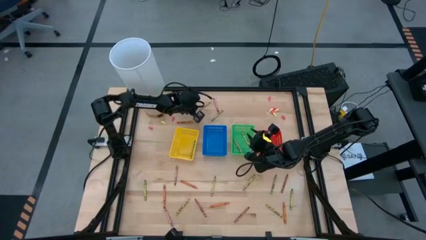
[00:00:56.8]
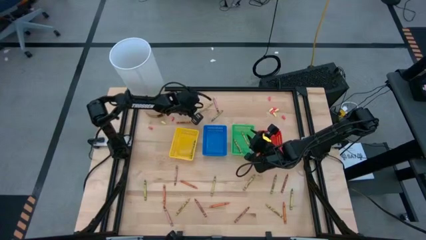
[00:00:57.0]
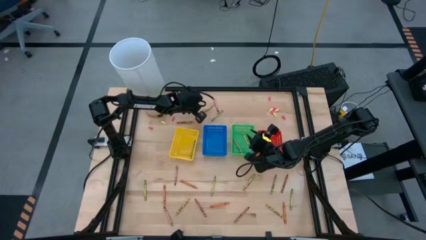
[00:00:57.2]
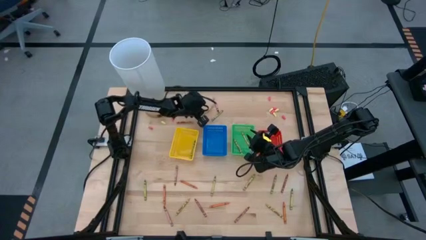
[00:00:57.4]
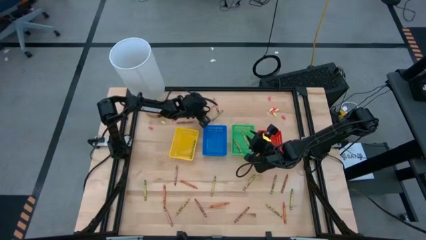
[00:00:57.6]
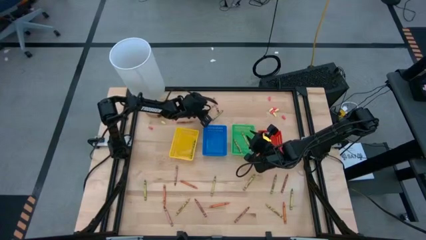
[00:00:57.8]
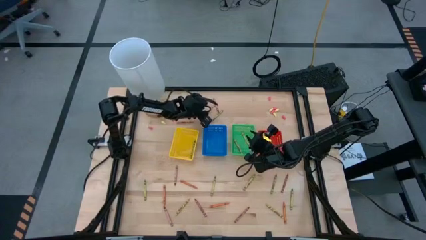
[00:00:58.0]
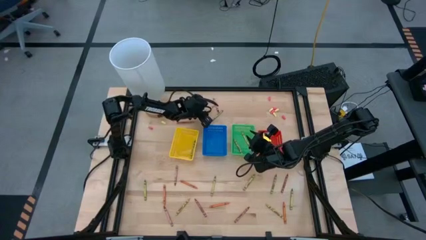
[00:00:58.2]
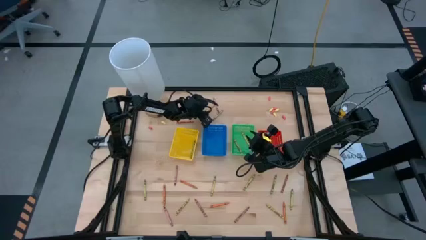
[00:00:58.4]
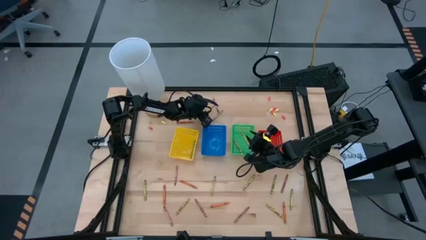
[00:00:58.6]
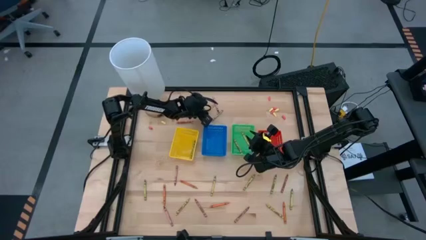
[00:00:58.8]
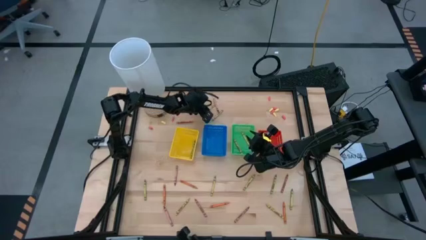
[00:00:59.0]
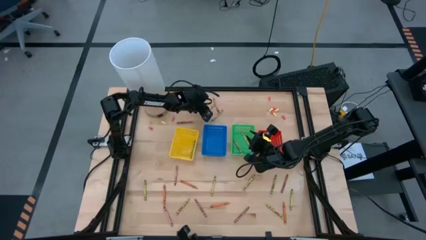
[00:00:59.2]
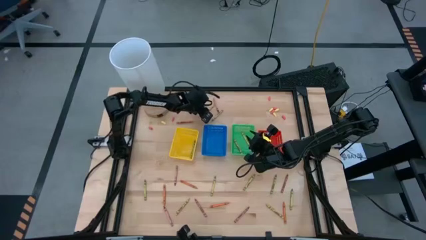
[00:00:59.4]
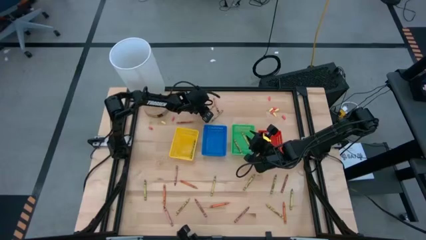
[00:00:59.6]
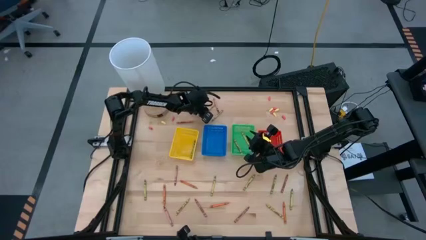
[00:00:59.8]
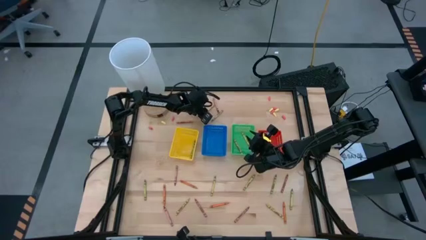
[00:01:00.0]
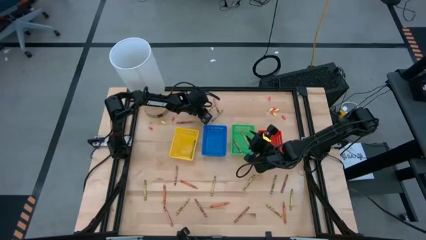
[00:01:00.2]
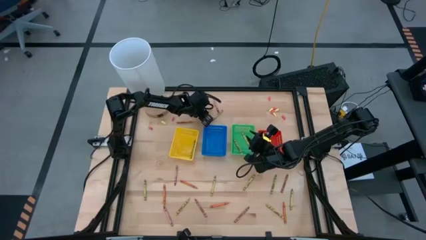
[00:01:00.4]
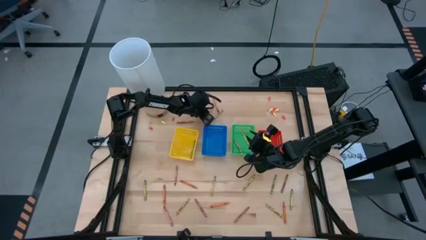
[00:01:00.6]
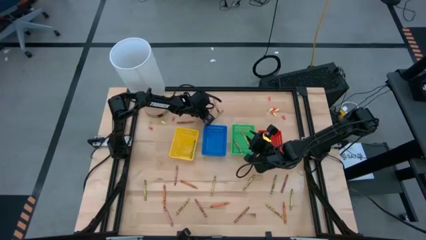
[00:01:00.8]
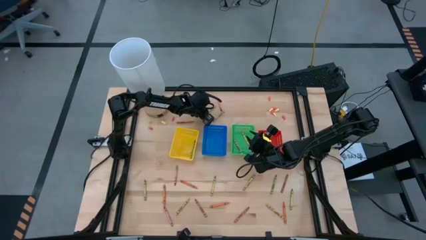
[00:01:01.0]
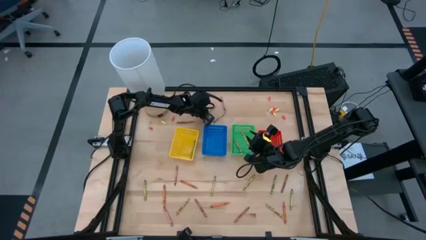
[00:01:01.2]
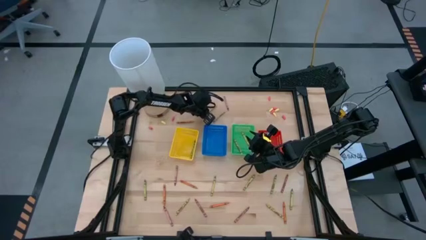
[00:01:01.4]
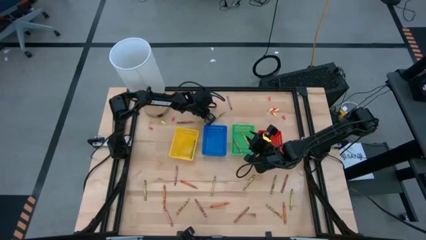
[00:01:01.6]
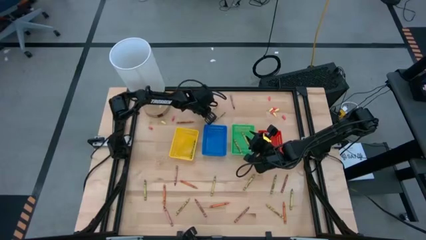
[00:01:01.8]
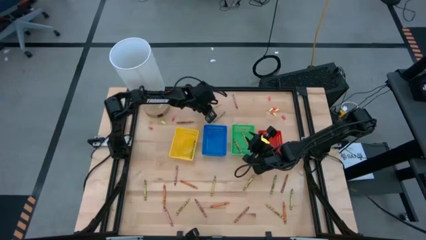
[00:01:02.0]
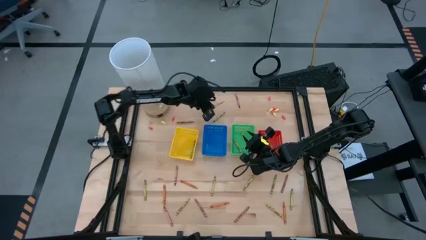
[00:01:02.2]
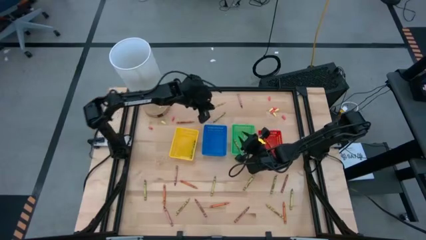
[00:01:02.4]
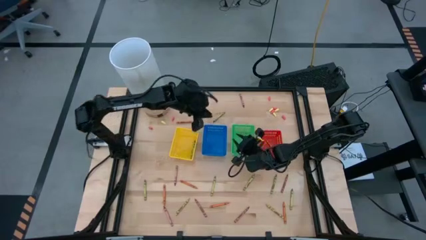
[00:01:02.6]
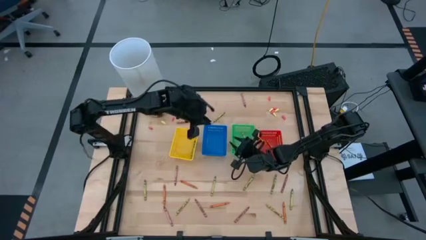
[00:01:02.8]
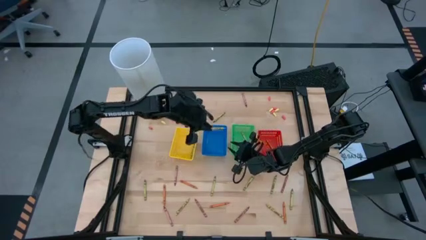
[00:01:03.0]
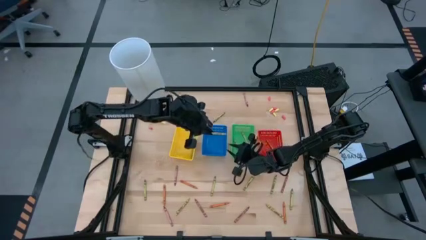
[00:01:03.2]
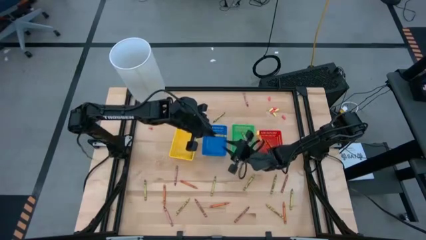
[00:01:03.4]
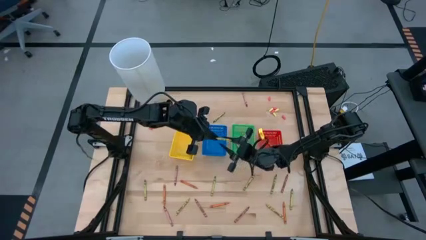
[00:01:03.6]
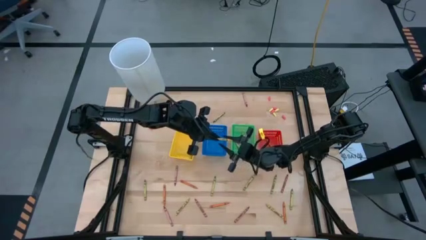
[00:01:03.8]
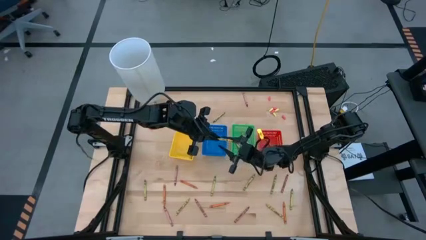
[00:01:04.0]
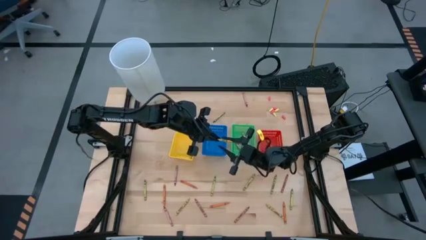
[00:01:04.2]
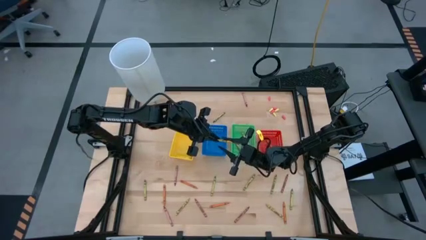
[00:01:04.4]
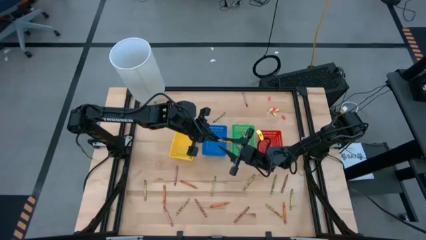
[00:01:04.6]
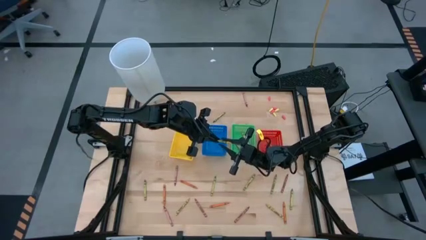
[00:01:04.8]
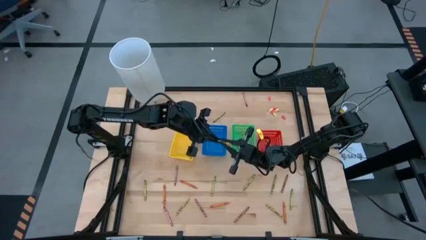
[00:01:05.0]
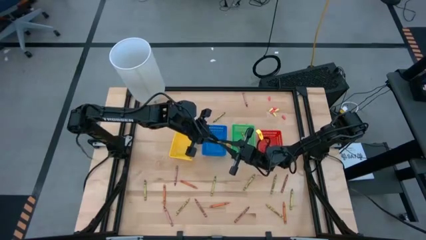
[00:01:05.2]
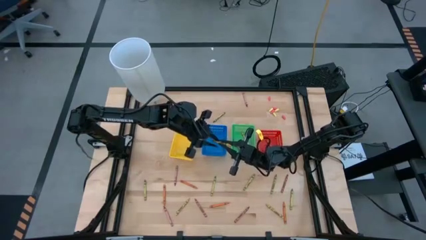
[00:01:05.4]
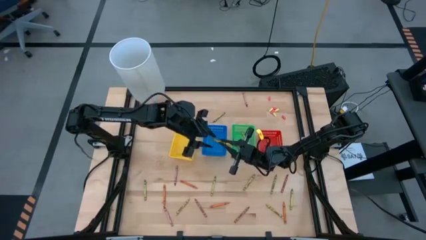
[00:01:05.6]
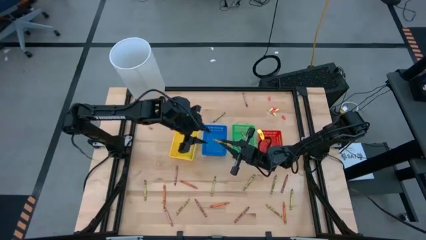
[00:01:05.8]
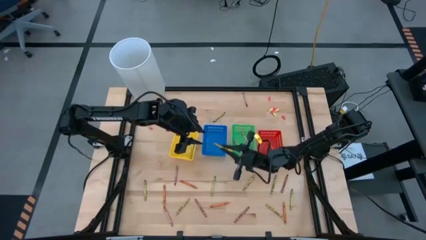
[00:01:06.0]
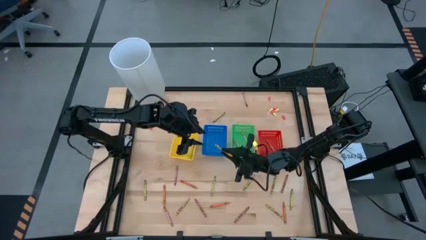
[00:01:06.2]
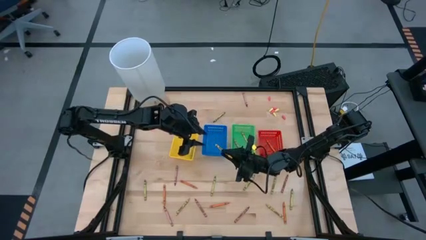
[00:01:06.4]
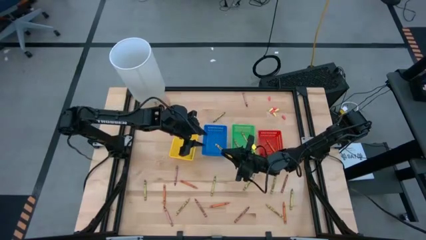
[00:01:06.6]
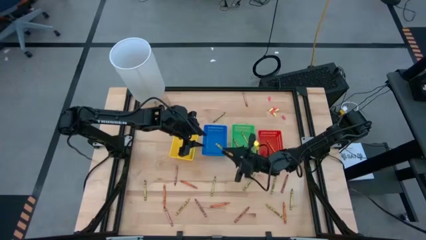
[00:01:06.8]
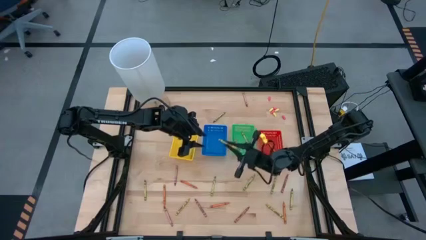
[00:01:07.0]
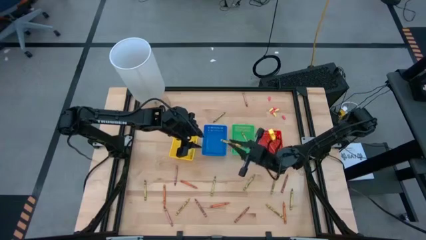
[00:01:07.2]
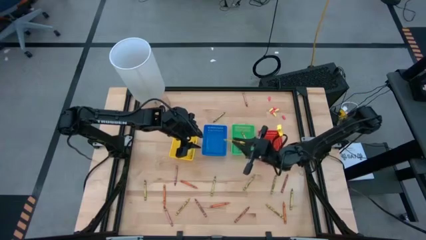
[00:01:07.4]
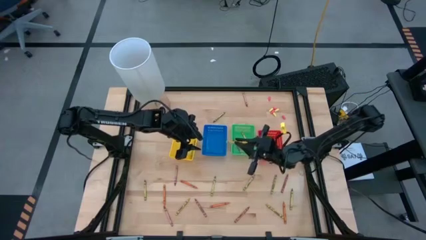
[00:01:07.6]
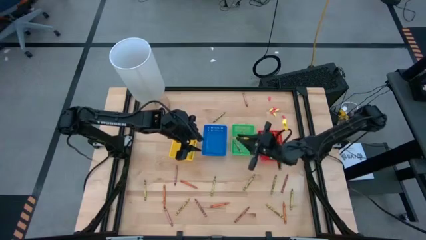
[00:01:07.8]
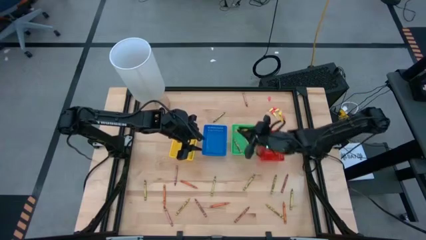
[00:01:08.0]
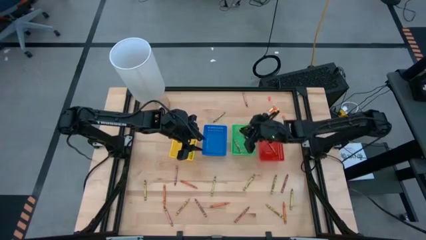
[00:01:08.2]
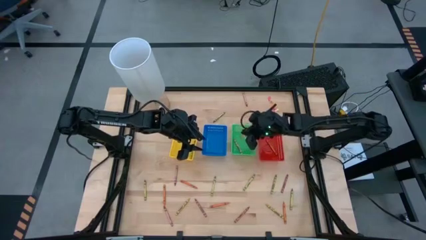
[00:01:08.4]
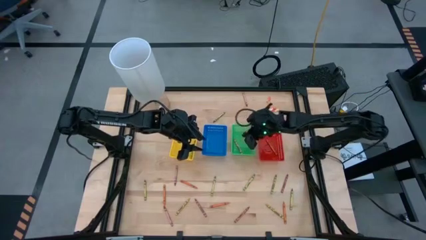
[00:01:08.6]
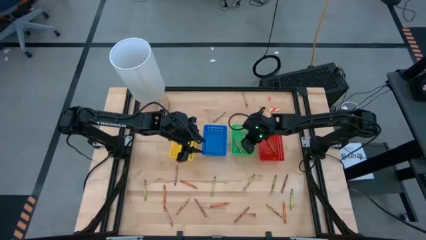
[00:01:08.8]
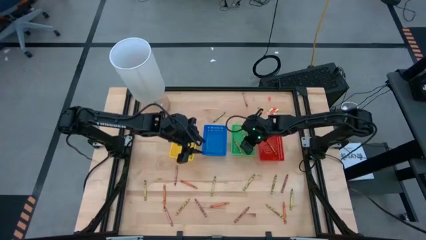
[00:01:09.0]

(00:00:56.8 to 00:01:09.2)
Task: Sort crayons
Put the yellow crayon into the green bin

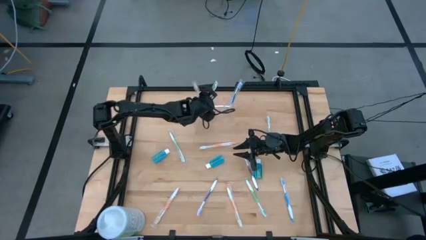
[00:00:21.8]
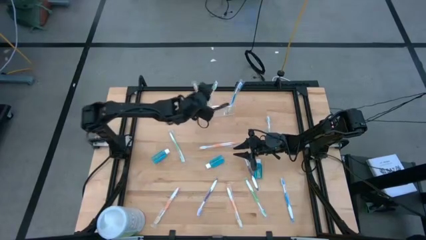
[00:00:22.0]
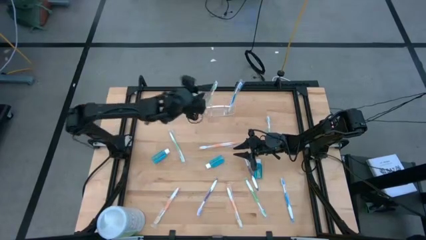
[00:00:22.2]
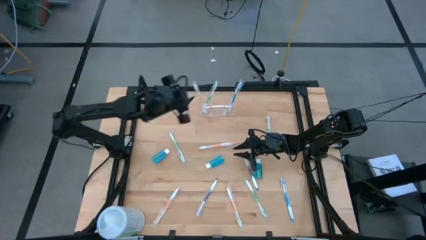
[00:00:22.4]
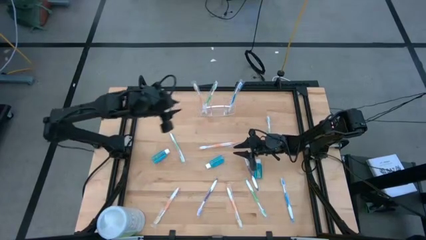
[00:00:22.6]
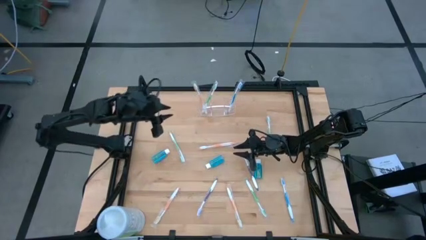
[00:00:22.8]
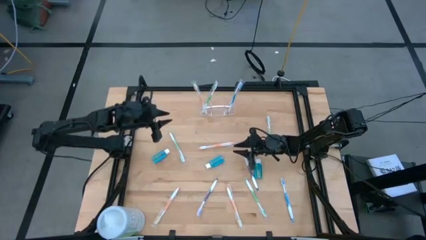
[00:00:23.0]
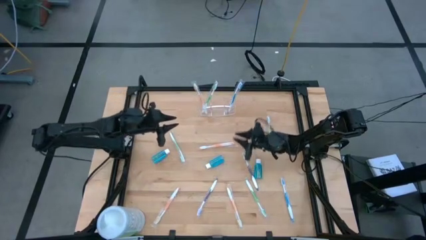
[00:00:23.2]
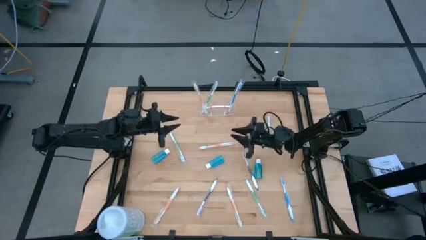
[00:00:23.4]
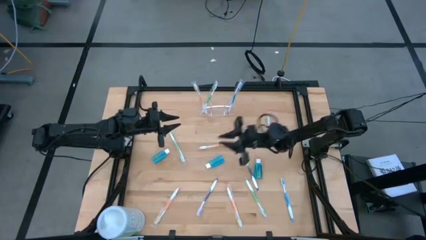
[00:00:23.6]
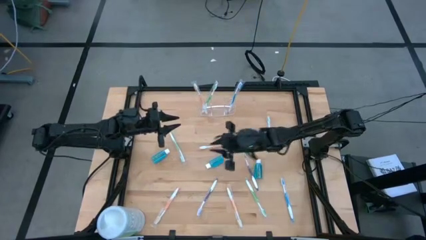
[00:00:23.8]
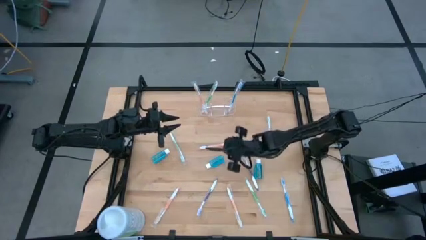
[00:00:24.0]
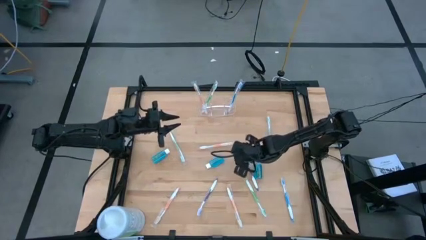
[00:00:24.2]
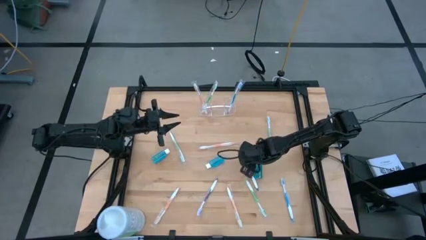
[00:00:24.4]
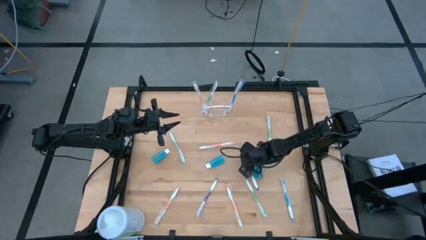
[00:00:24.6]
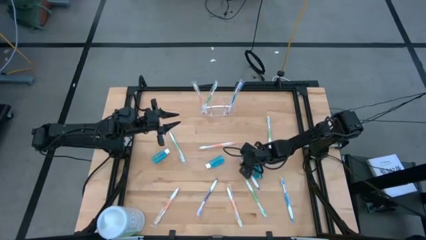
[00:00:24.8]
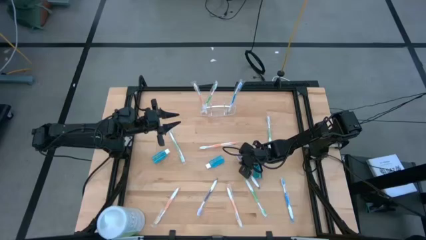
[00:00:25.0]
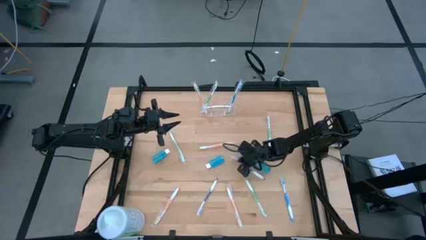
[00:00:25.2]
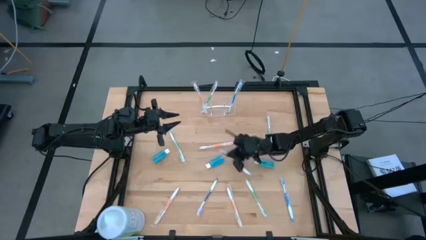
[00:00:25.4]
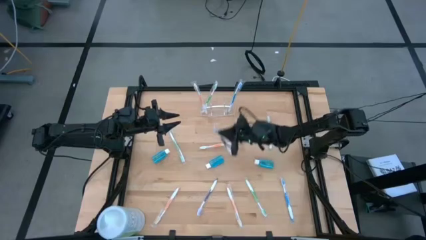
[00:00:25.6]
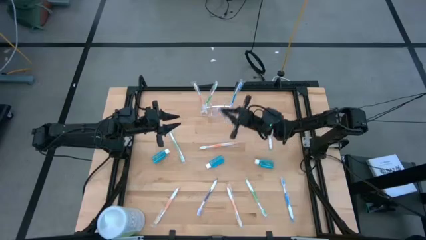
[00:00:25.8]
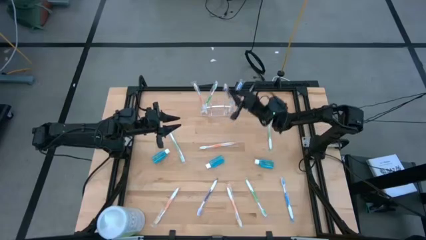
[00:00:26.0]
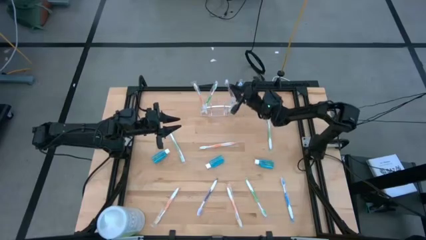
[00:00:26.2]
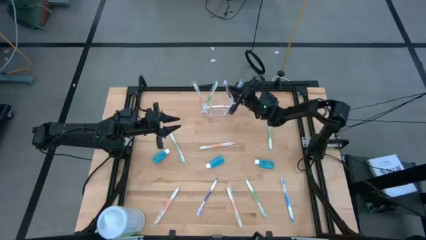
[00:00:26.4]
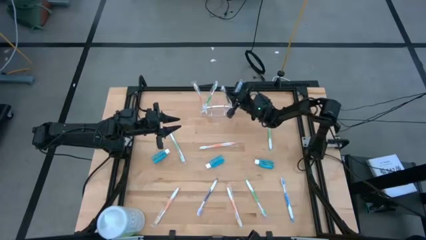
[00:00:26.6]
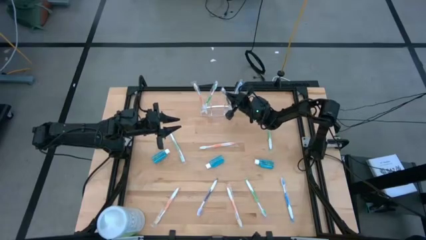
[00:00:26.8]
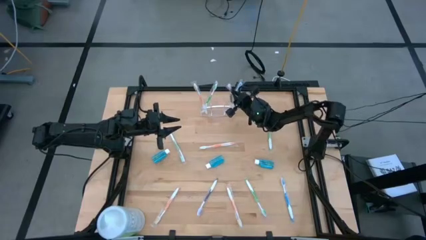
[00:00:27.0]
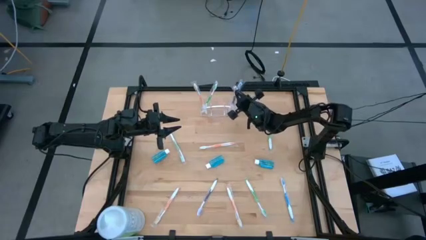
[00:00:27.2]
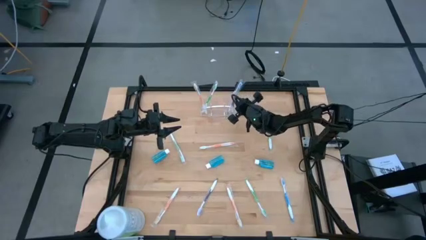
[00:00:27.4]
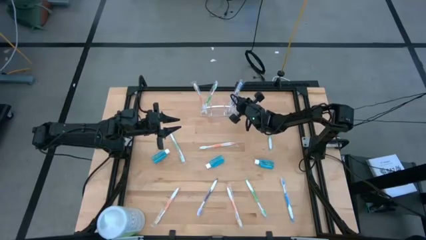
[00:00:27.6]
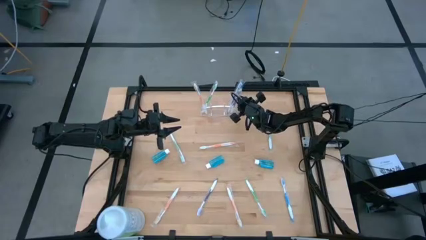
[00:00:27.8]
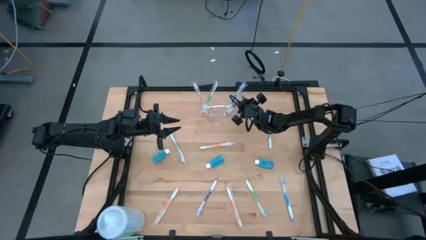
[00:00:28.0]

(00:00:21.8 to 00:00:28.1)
Task: Pick & Place toothbrushing station
Put the purple toothbrush into the transparent organizer
